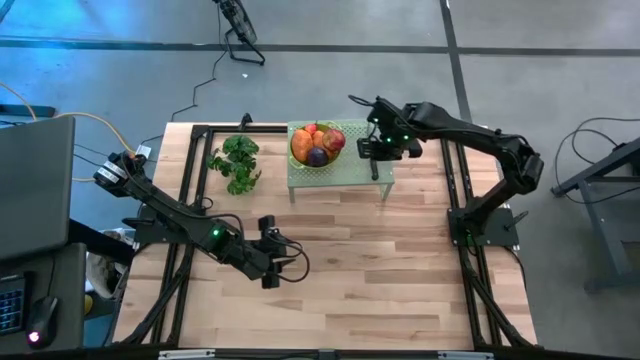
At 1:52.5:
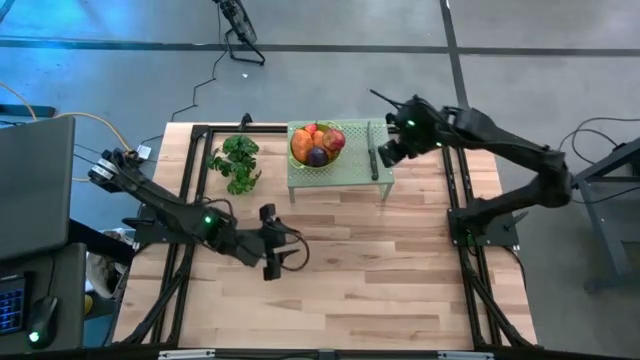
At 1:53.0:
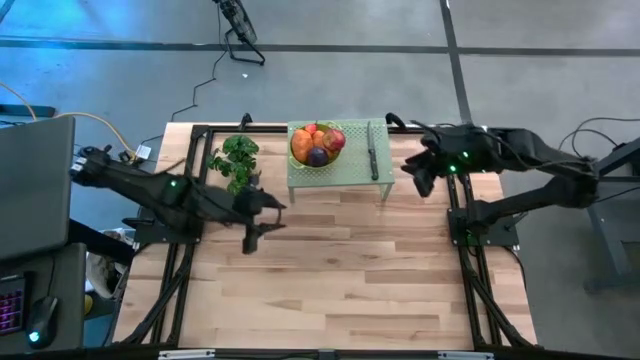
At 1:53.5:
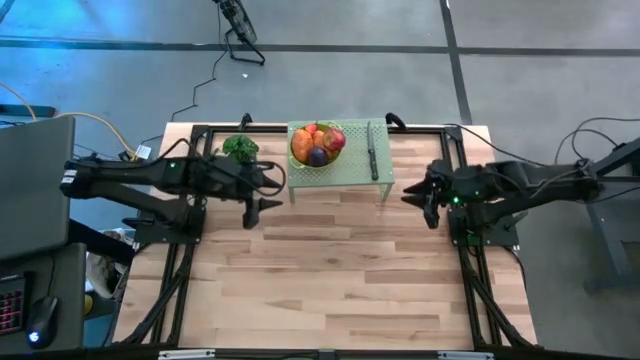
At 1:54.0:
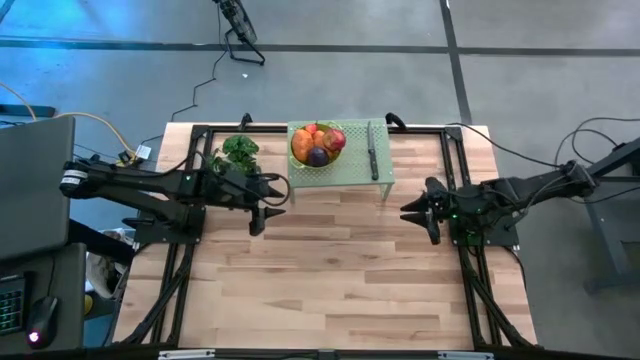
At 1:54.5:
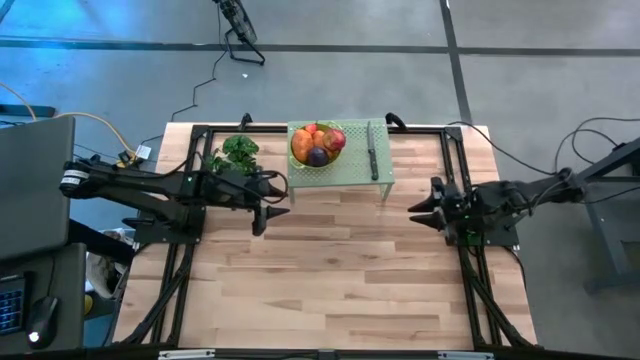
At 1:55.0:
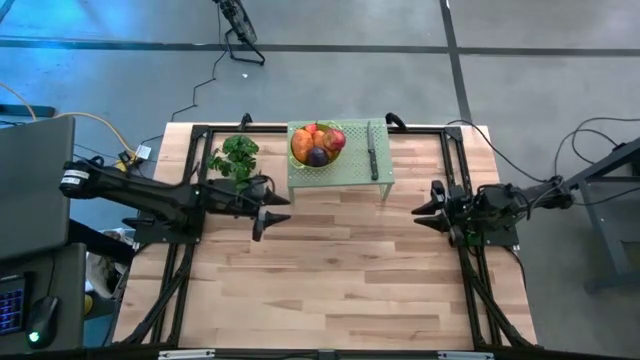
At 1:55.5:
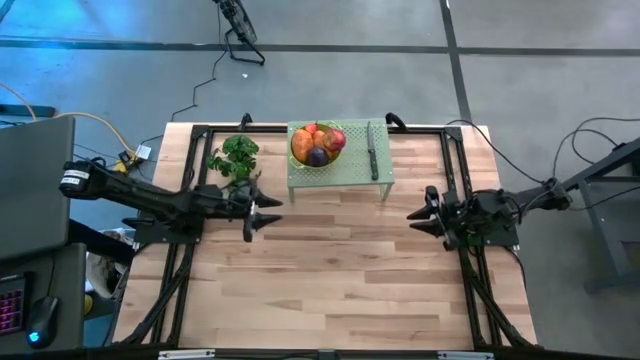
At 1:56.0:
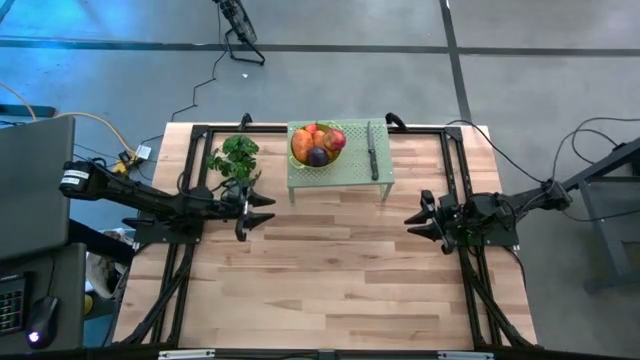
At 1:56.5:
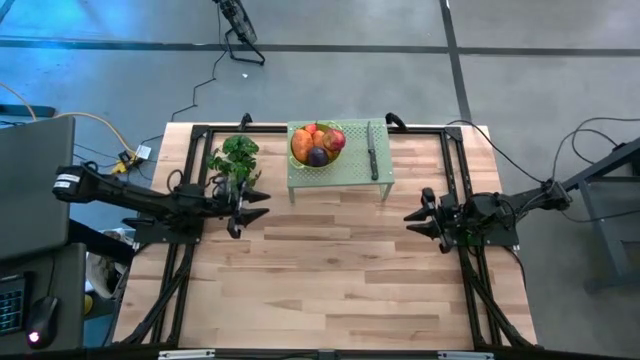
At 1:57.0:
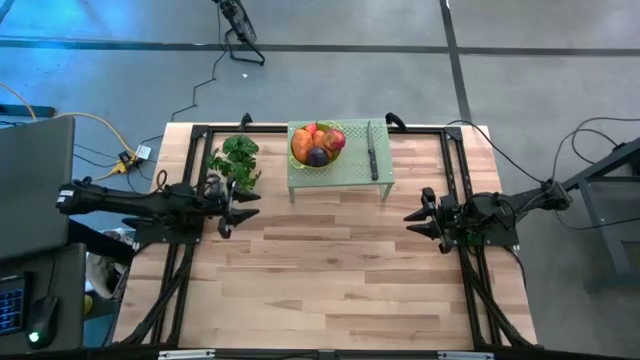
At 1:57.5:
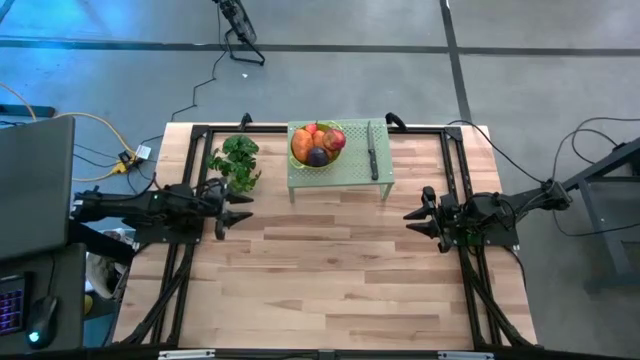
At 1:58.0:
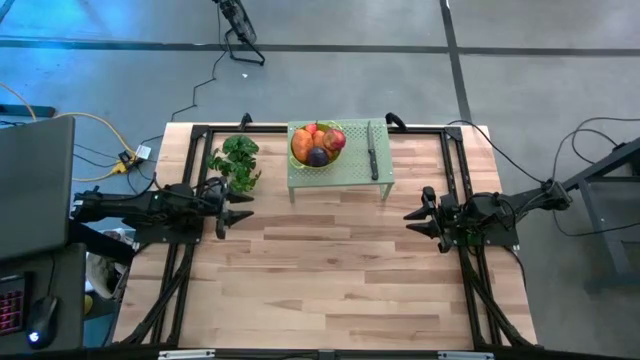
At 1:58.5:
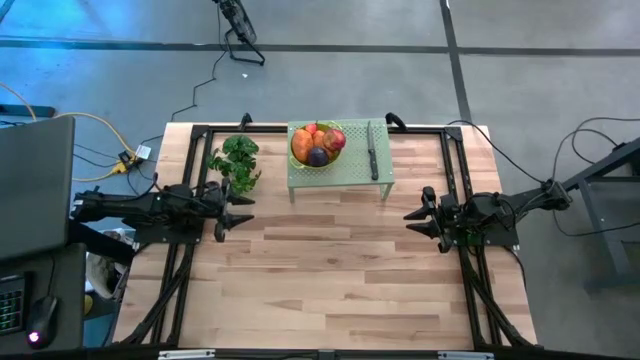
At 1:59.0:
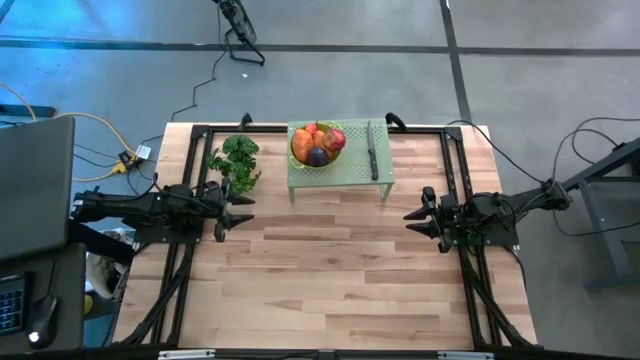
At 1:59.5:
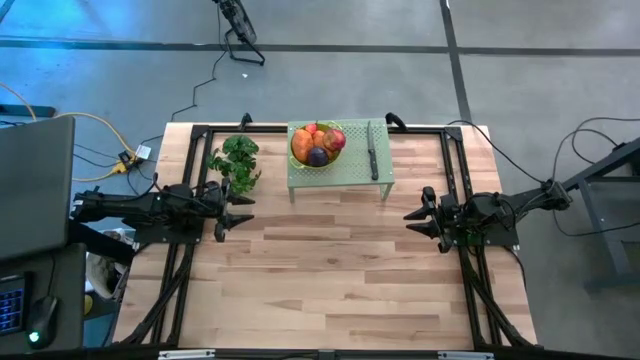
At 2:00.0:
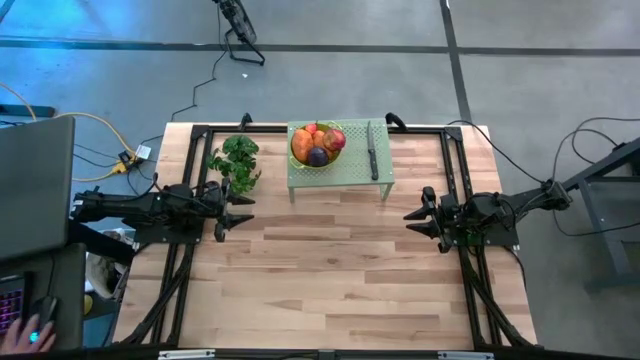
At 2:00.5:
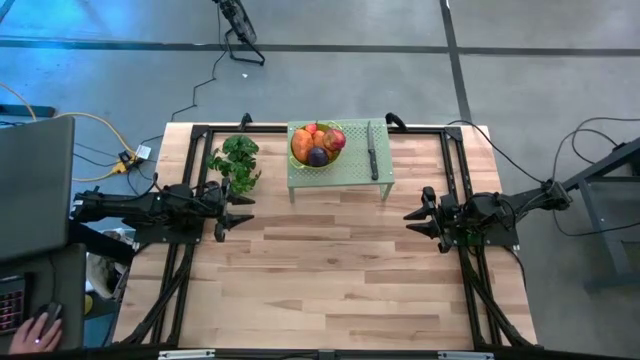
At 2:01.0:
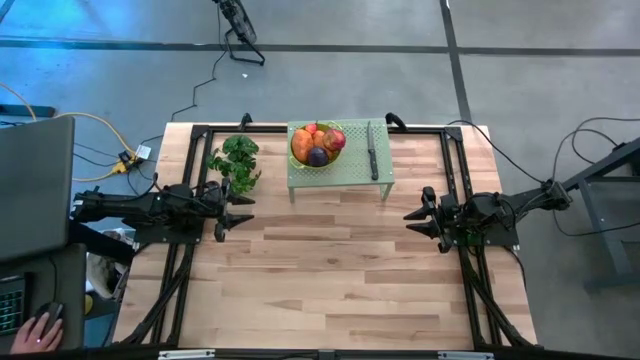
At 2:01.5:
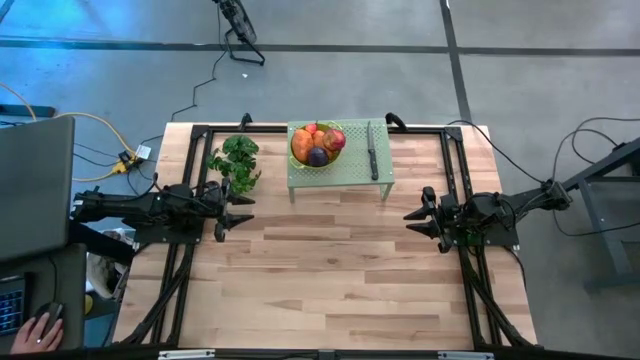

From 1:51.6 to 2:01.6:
Task: Pick & Place Fruit
Return to Home Position

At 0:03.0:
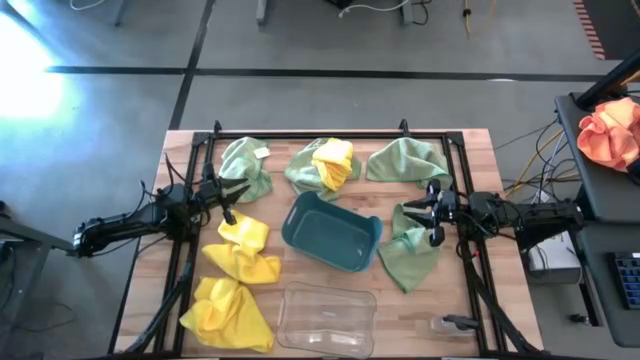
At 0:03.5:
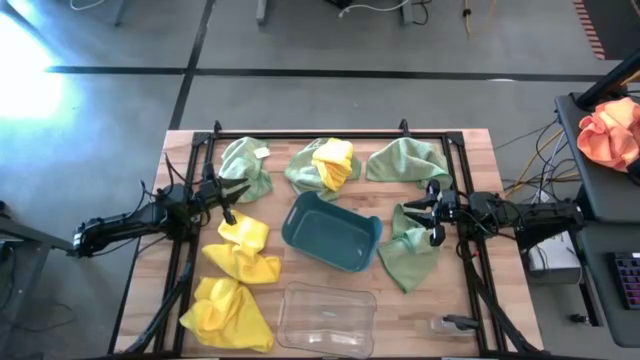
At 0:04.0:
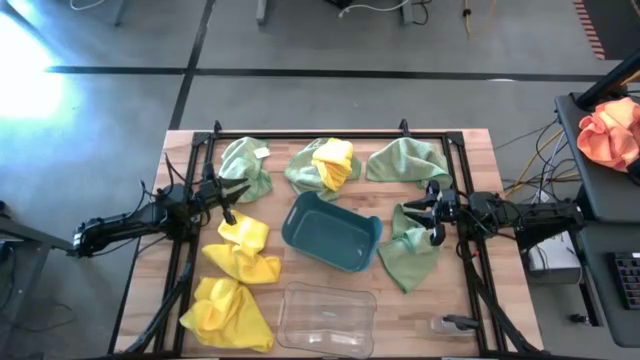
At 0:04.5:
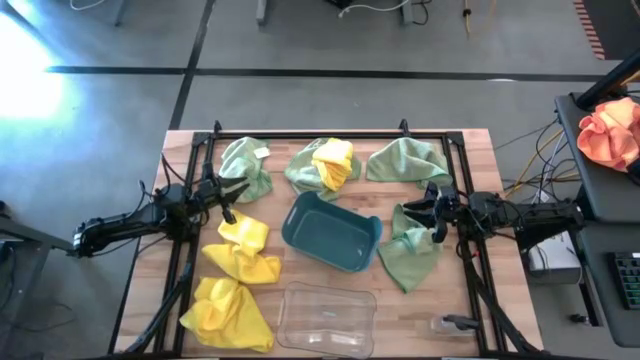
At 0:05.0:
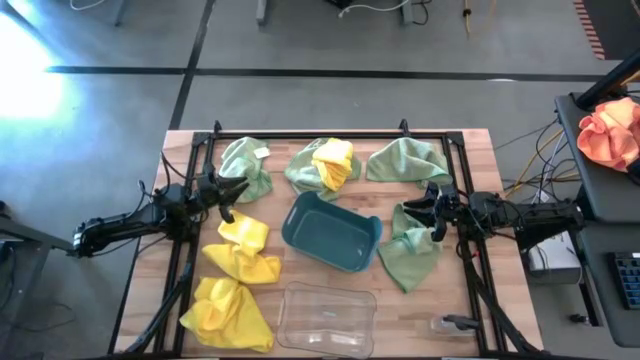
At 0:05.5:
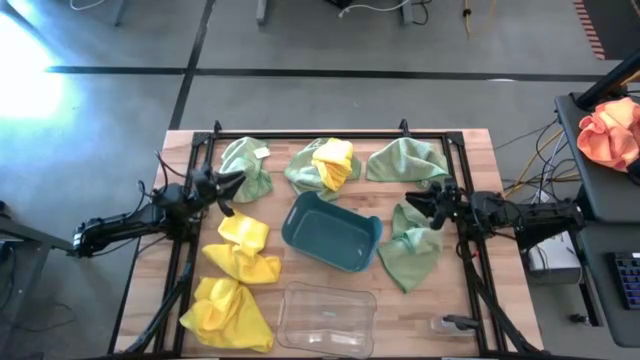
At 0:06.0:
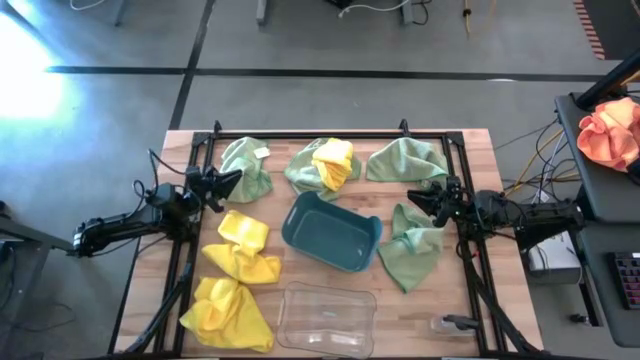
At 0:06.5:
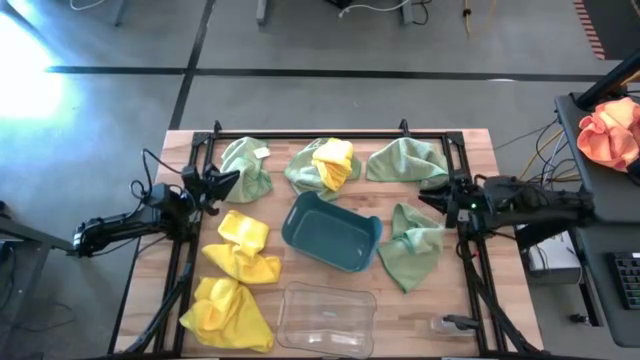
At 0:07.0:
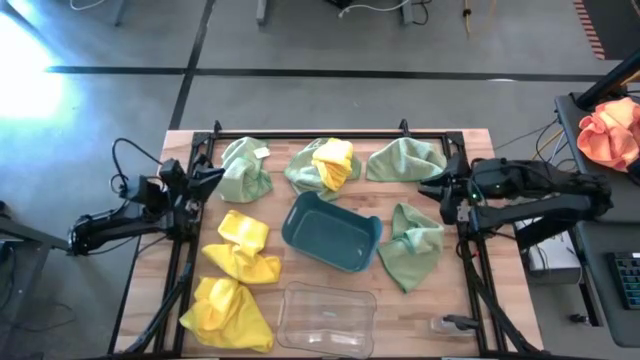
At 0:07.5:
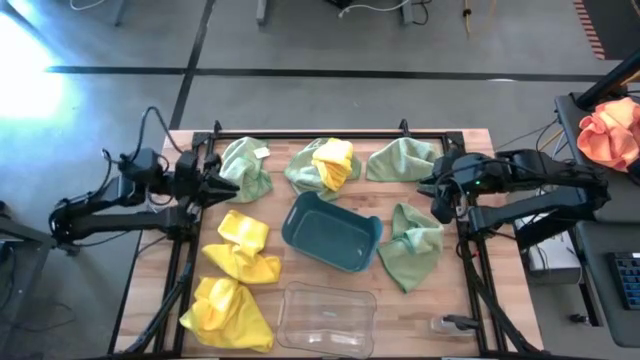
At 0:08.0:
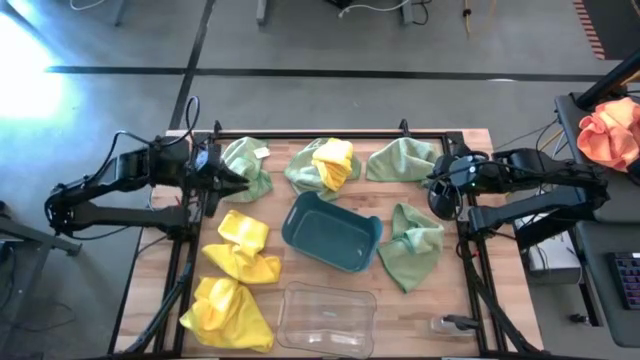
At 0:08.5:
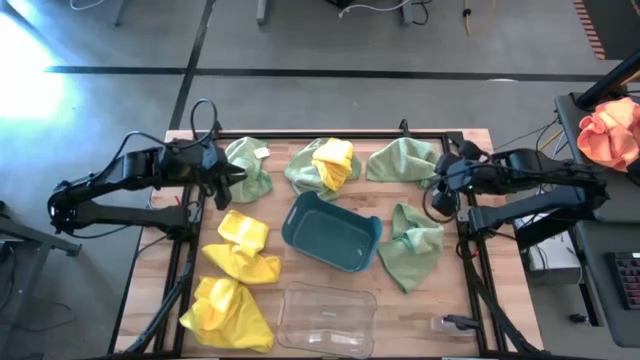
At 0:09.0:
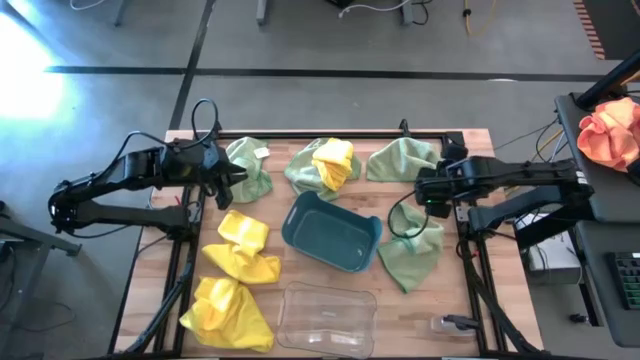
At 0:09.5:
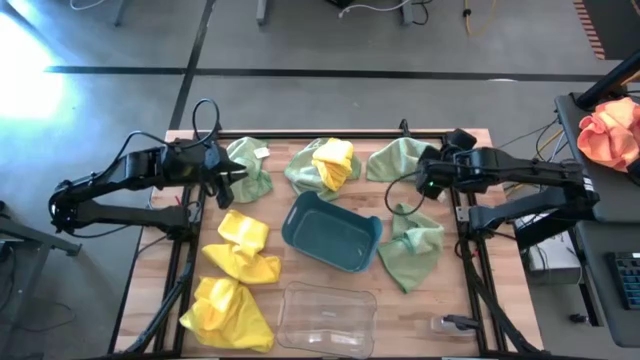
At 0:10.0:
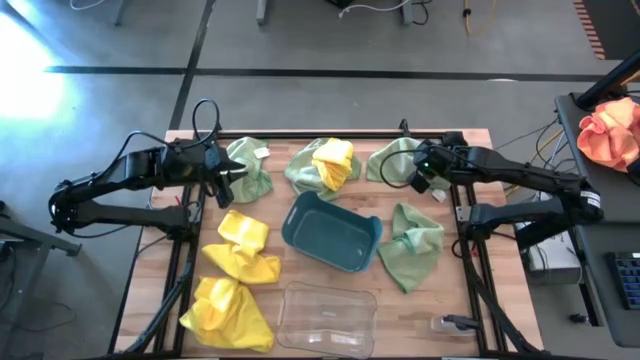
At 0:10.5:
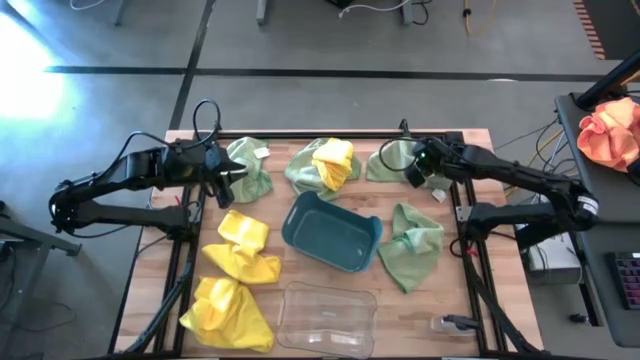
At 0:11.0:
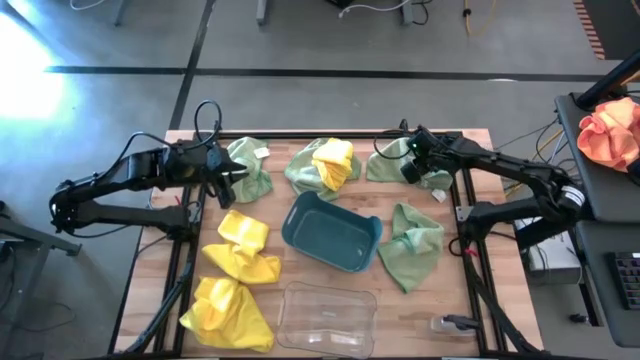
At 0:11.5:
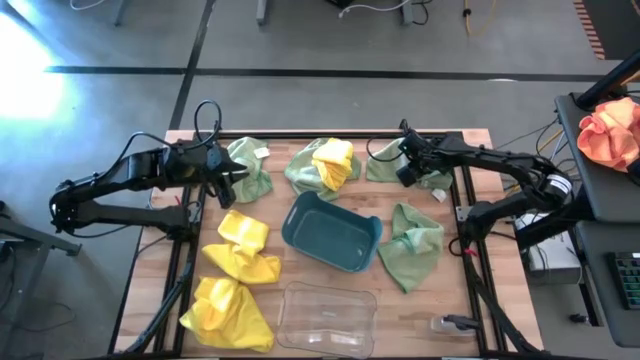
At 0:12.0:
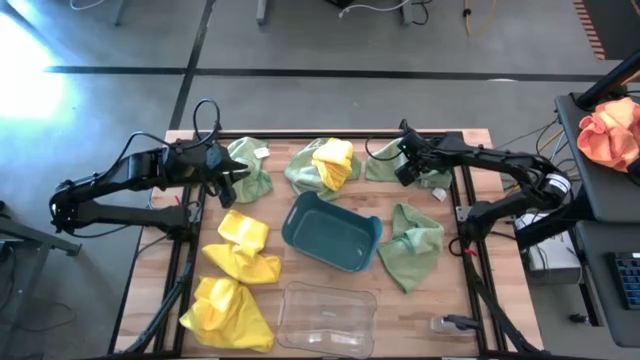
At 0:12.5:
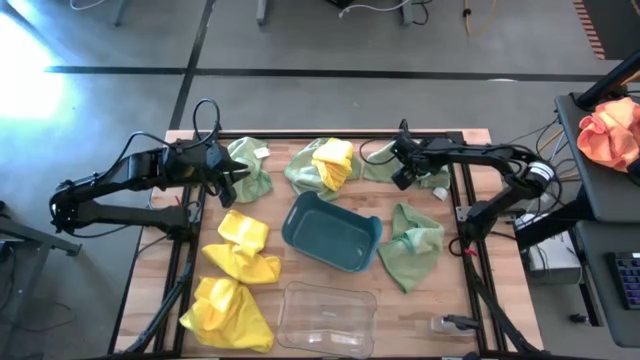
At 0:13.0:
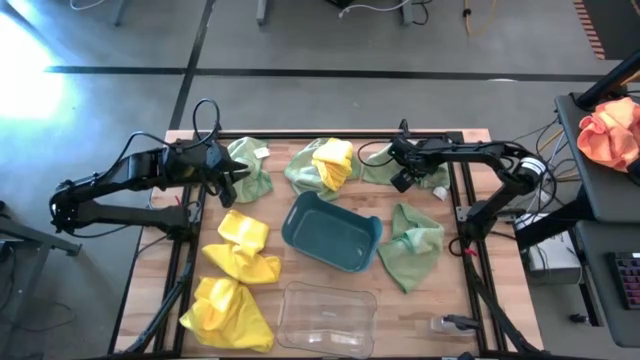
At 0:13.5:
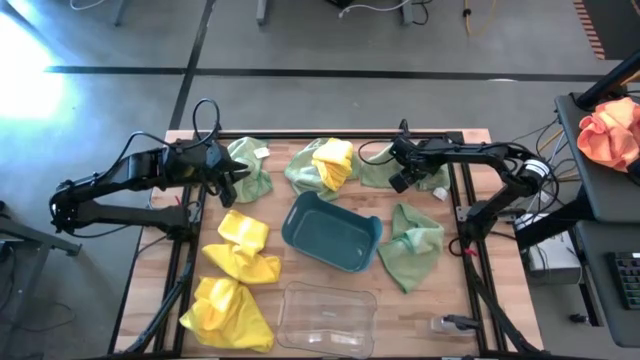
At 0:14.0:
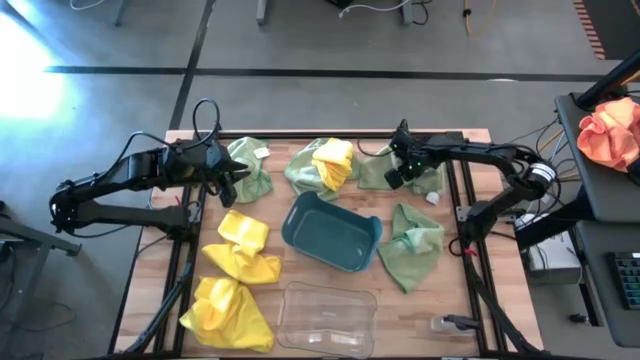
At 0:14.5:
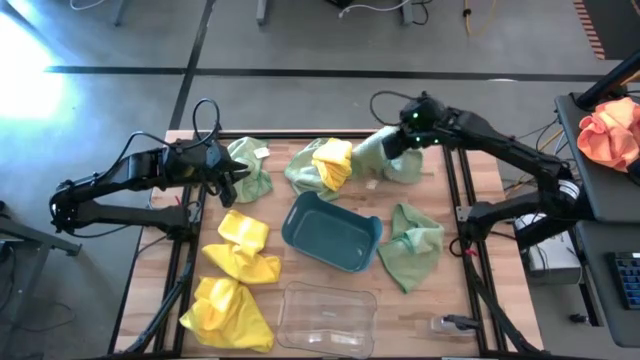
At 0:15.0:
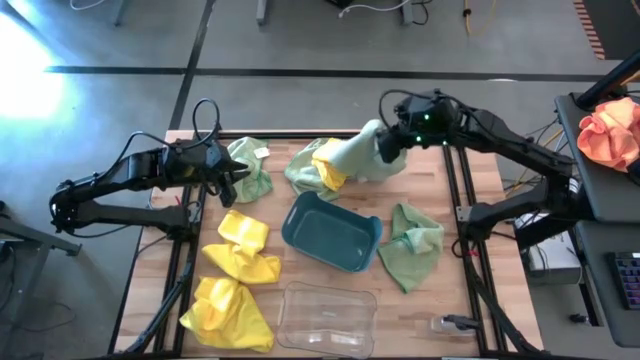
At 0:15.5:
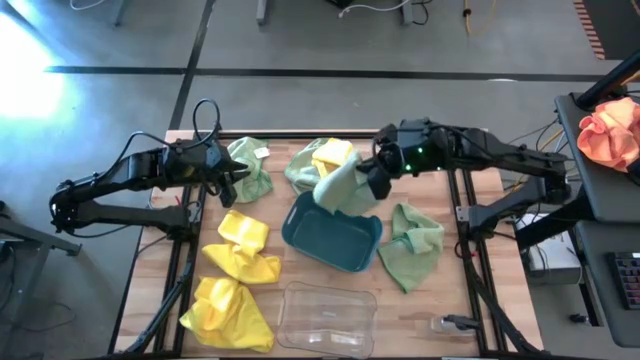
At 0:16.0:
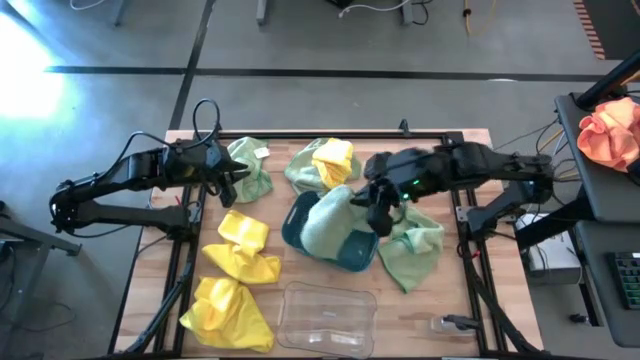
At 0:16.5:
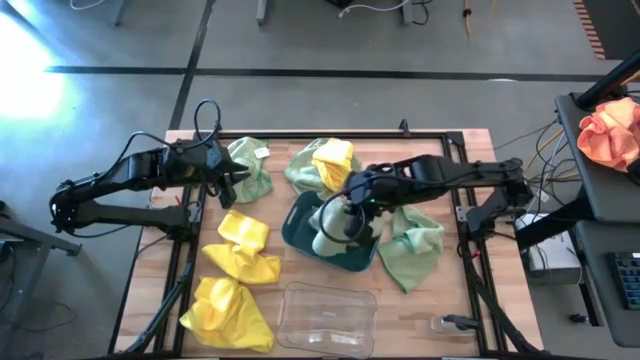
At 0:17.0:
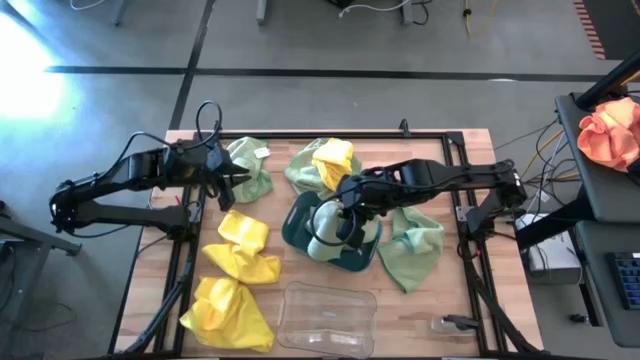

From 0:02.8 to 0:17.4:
Task: Sort microfiber towel by color & place in baskets
Put the top right green microfiber cloth into the blue bin
